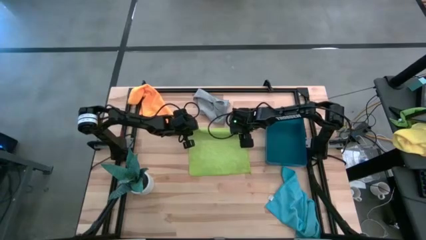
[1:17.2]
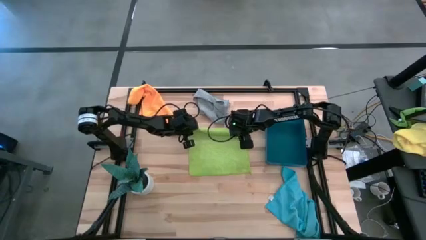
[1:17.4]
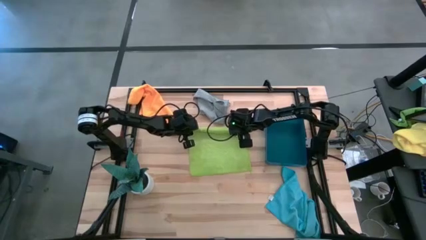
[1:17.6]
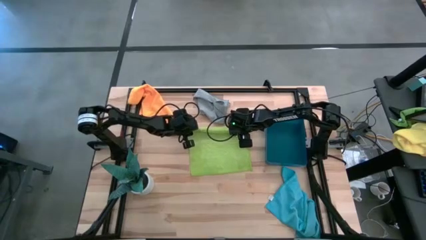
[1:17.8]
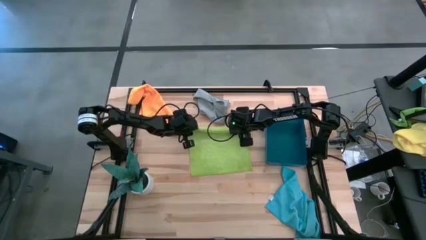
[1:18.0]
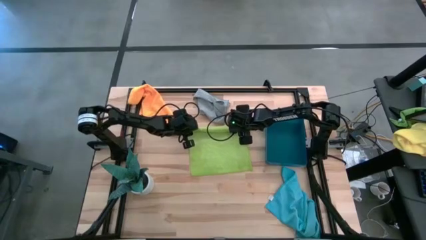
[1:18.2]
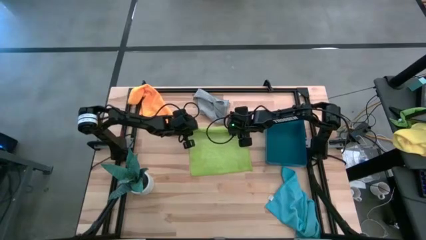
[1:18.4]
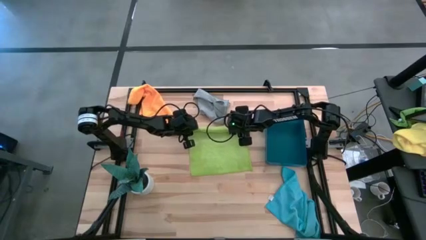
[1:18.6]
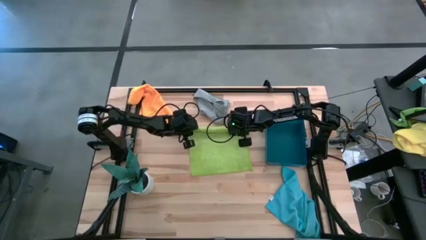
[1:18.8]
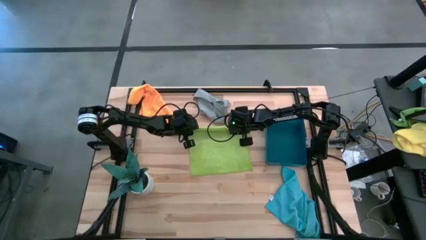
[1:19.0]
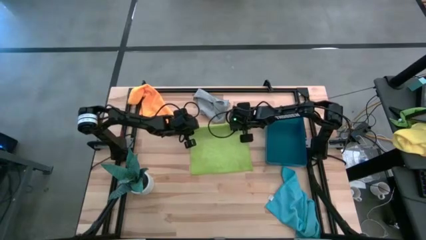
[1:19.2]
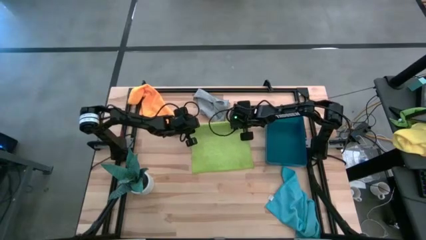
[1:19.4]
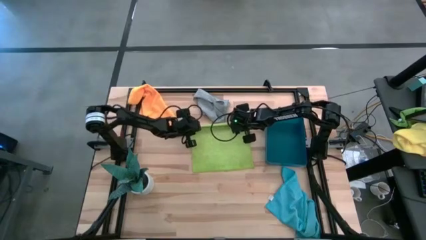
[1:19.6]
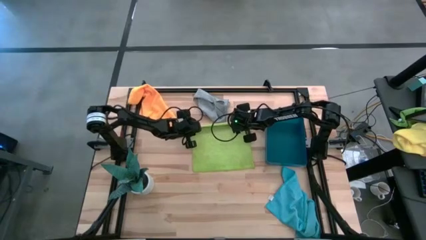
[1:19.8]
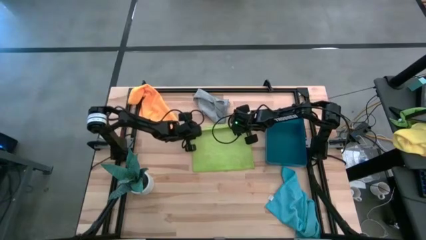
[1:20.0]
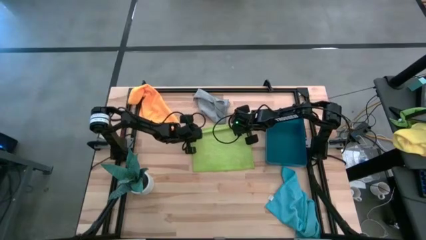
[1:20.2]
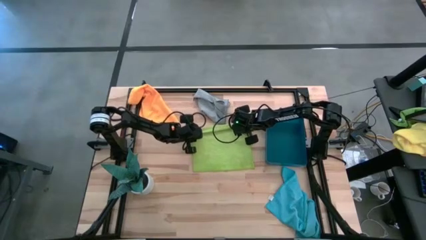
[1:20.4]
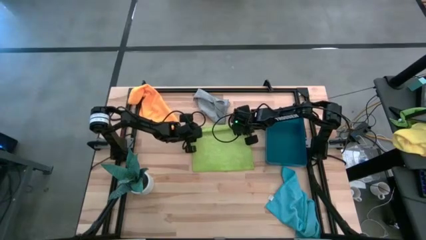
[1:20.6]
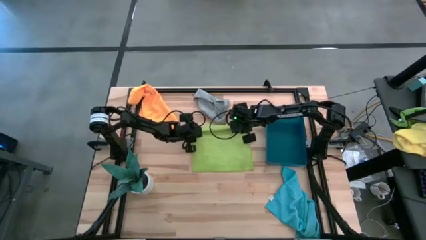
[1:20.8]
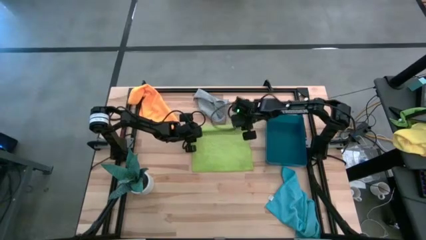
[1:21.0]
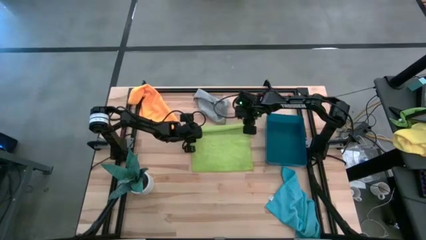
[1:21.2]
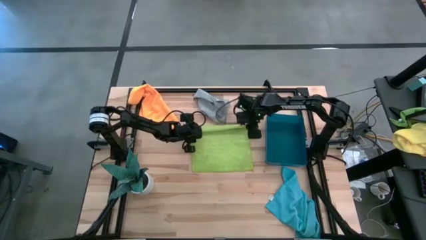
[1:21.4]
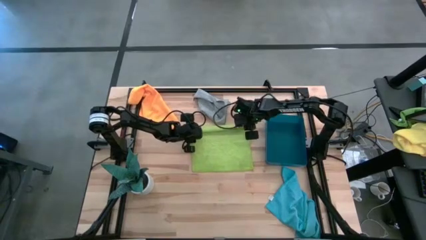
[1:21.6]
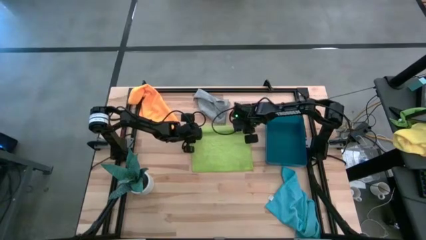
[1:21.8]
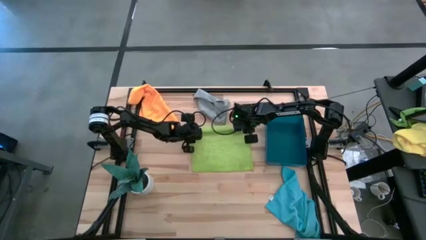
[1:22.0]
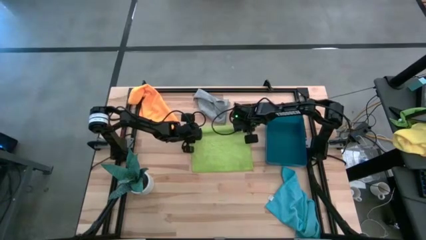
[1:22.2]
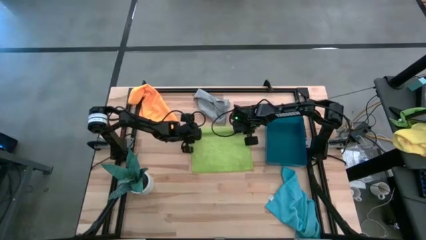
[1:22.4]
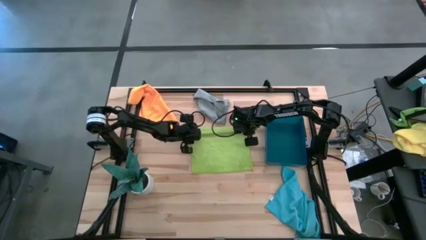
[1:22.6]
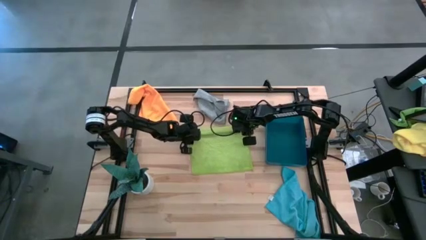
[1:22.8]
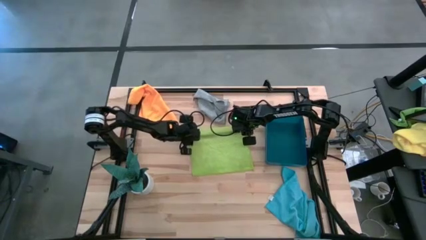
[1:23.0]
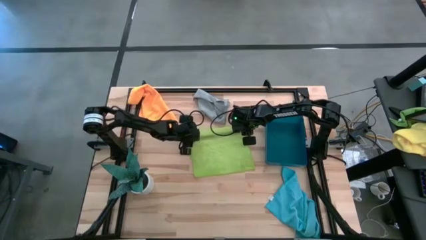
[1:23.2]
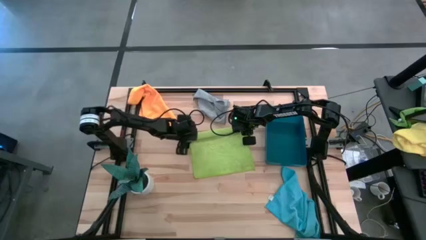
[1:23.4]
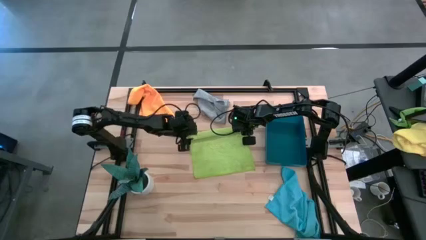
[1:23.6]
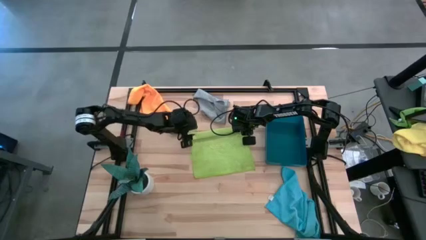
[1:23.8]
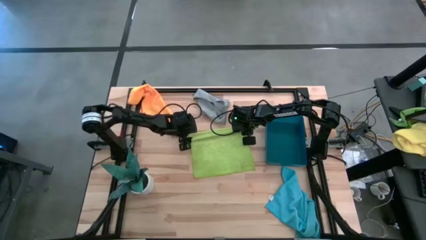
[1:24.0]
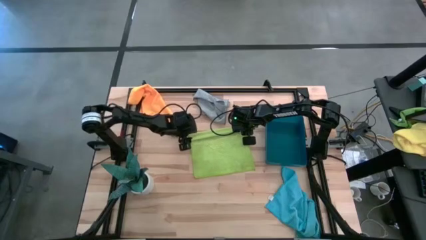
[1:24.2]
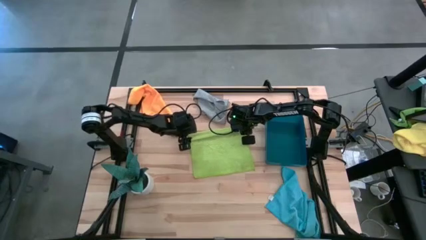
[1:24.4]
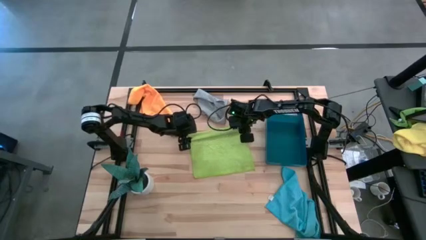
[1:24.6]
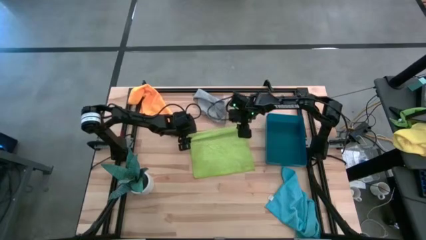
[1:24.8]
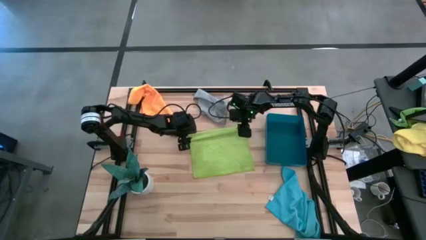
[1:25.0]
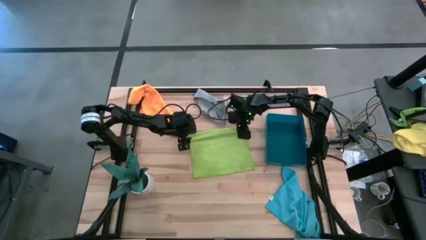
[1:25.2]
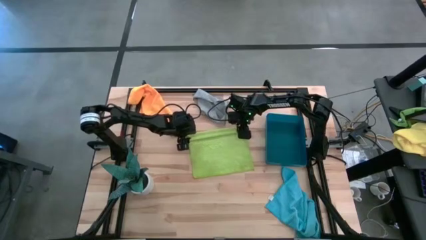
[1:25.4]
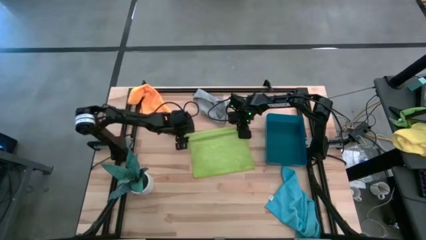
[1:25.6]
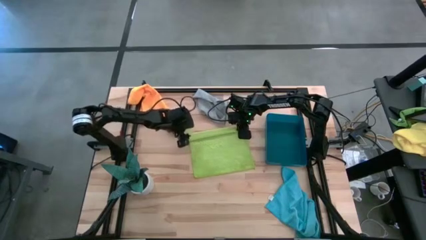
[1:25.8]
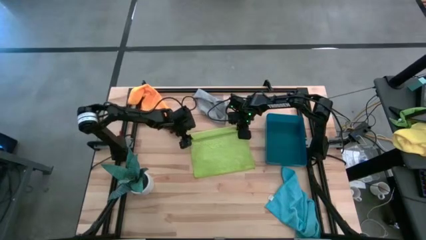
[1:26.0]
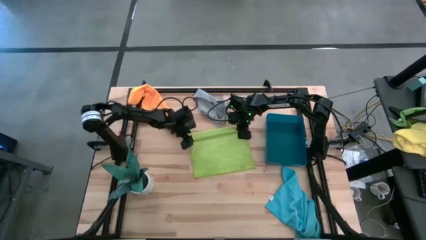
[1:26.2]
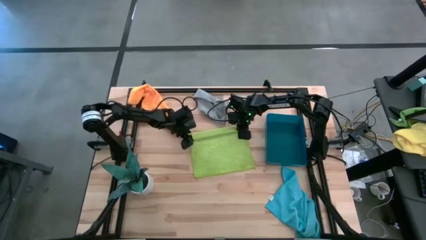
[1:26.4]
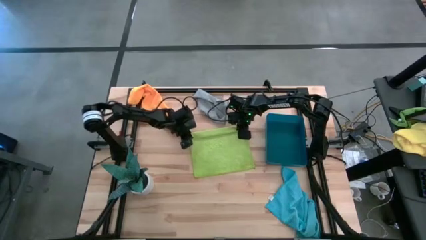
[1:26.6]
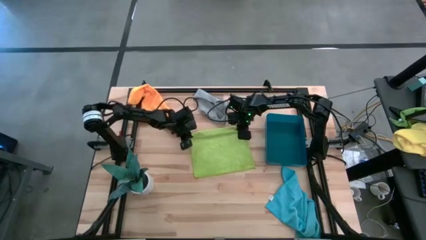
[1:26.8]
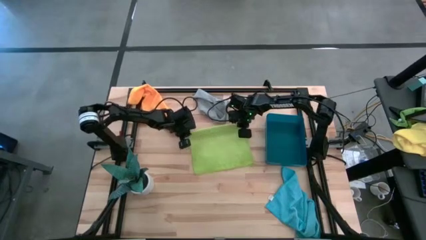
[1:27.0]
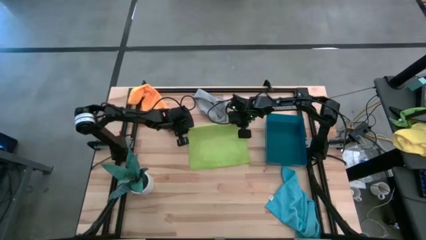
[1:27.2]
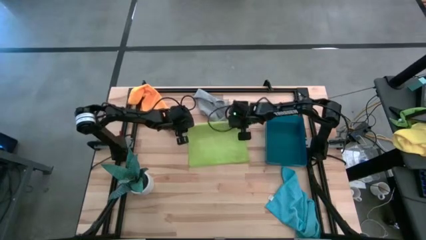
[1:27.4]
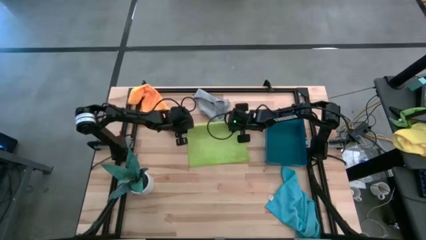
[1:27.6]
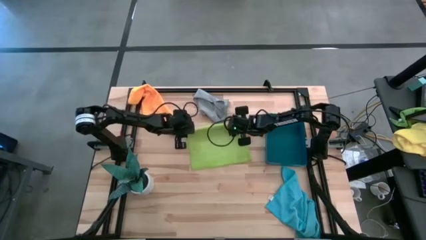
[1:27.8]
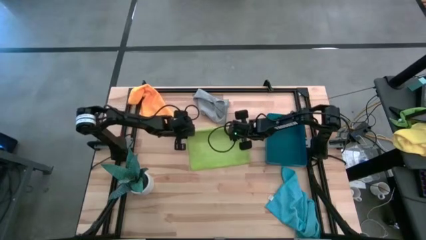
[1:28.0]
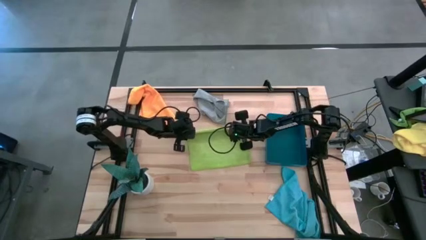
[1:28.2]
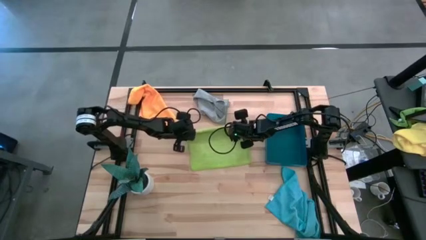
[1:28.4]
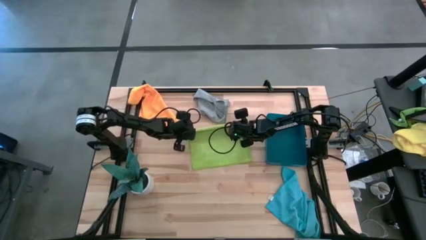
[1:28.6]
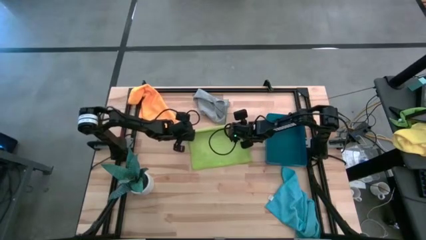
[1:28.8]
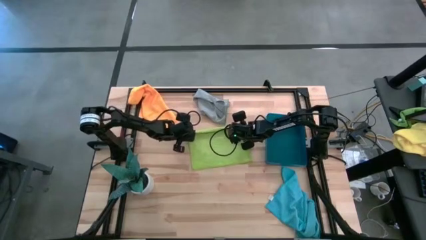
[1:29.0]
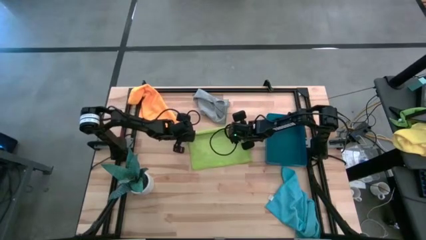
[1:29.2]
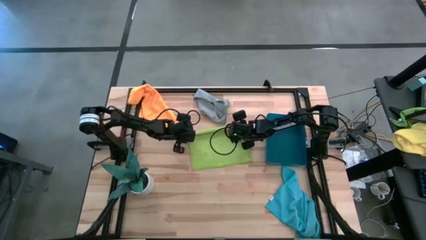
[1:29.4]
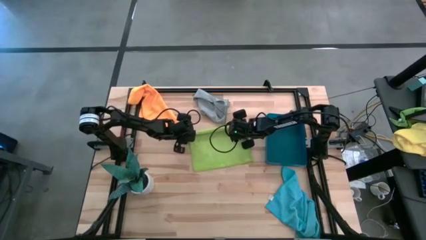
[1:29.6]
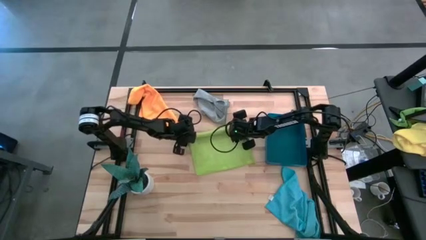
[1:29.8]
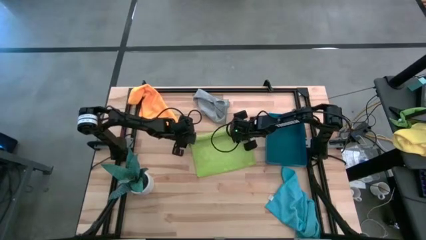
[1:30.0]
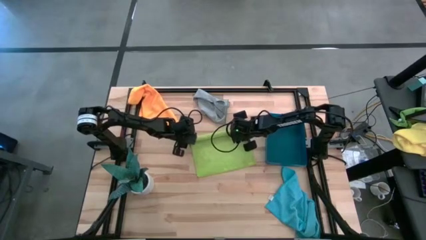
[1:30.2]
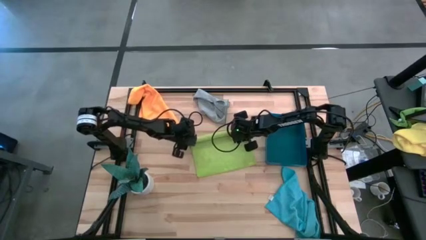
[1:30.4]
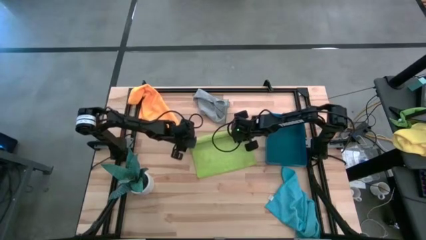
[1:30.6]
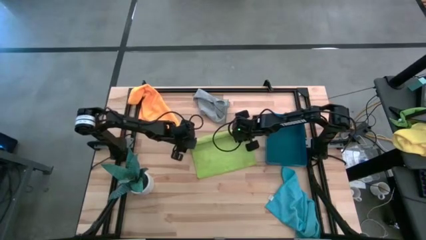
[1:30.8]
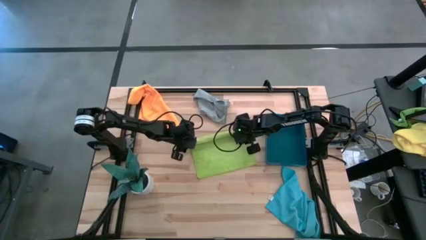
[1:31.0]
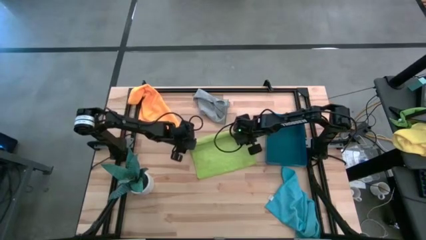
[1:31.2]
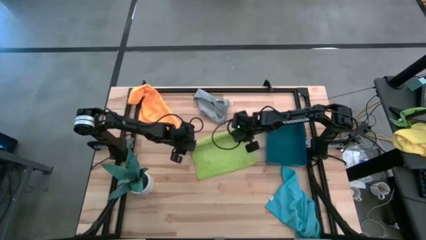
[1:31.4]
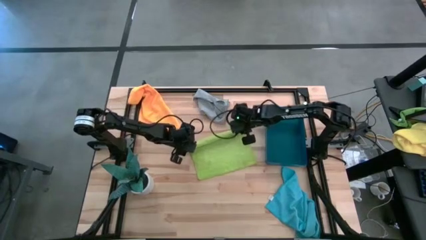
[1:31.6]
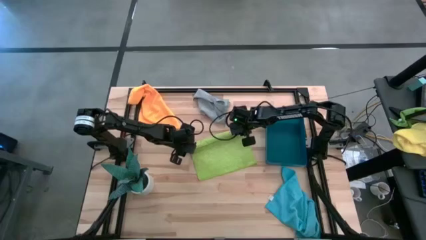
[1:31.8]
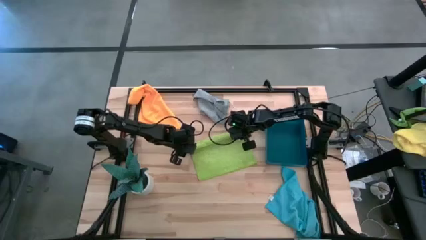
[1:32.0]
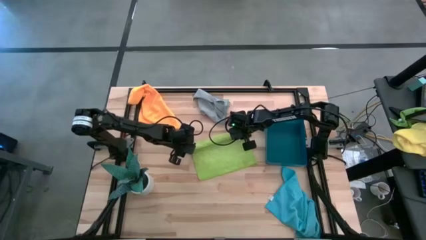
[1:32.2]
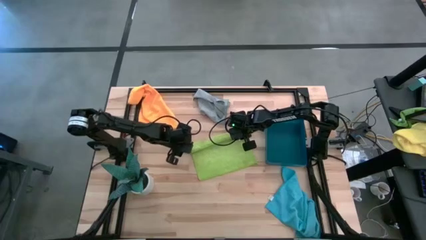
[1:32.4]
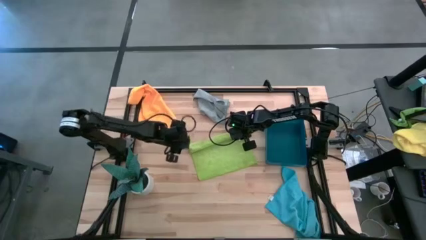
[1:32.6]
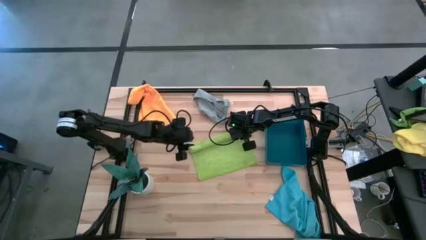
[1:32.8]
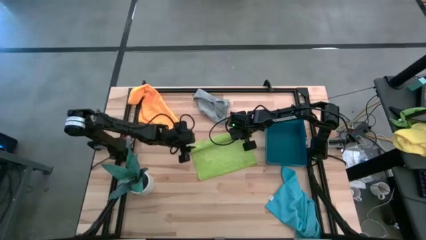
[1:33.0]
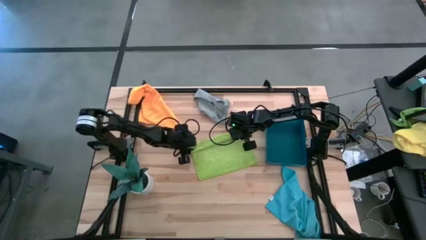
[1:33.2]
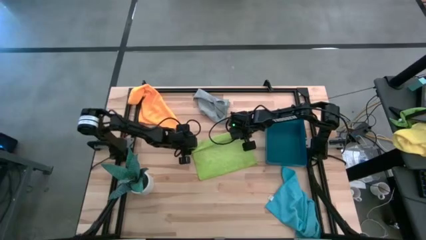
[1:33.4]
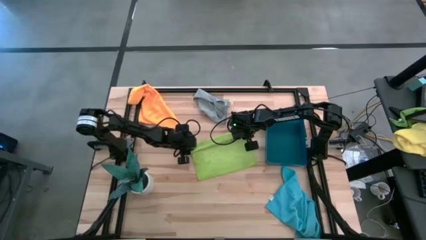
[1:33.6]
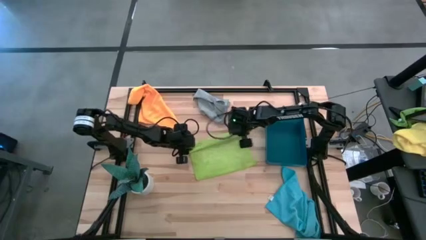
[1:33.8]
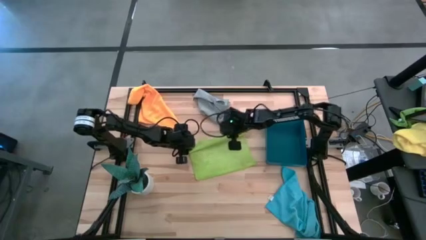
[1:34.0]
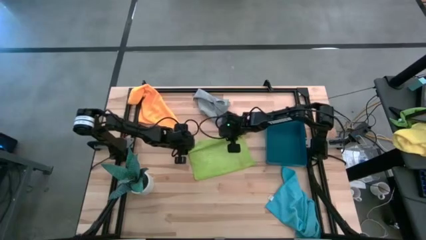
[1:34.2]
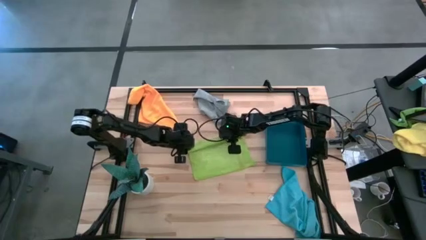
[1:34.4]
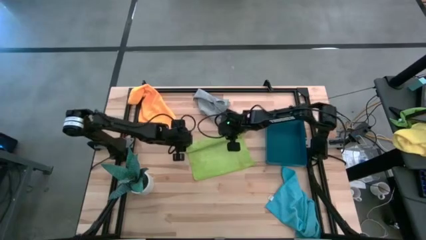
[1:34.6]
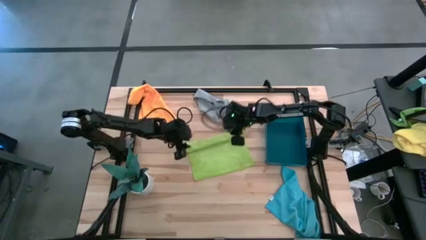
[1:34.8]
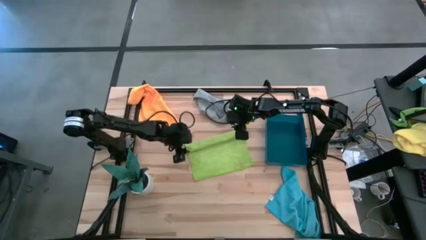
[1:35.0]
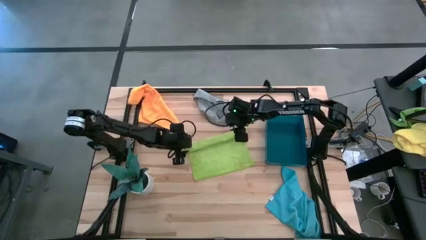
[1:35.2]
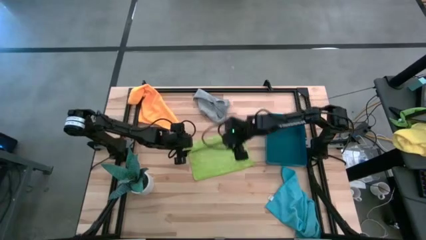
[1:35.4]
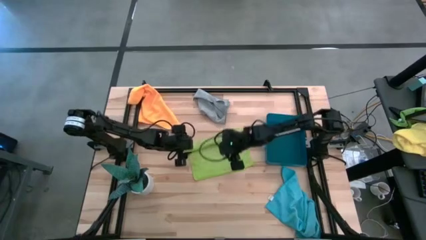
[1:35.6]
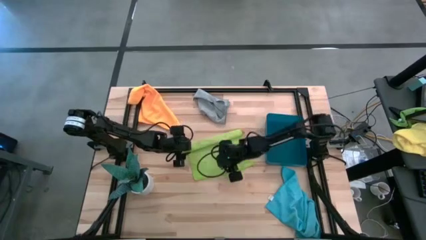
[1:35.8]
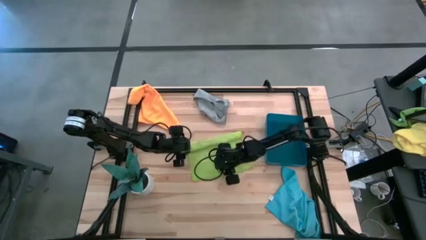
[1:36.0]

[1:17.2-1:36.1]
Task: Roll microfiber towels into tight, uniform cylinder then place into a basket
Roll the green towel
